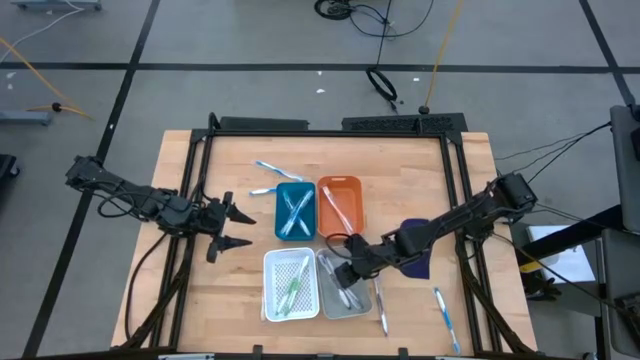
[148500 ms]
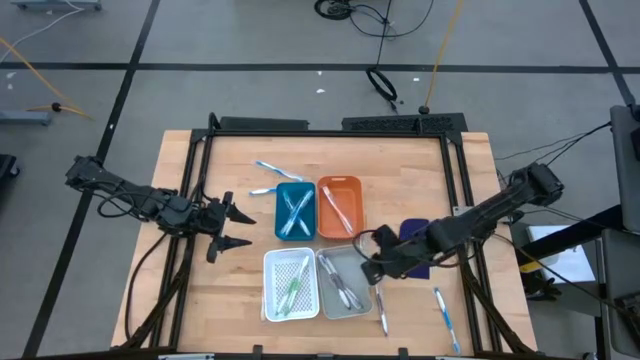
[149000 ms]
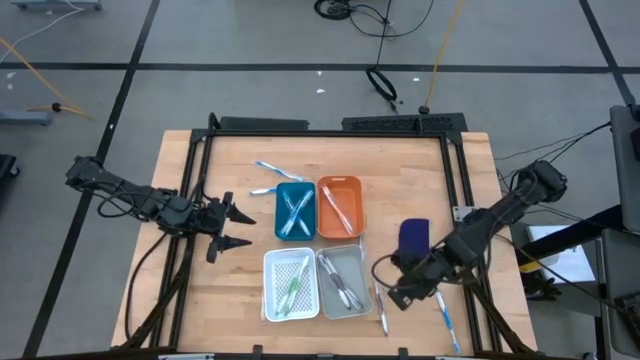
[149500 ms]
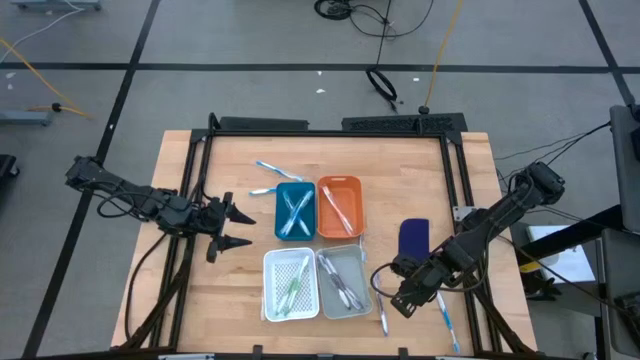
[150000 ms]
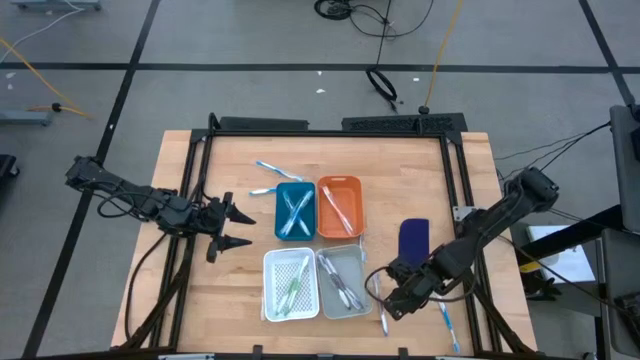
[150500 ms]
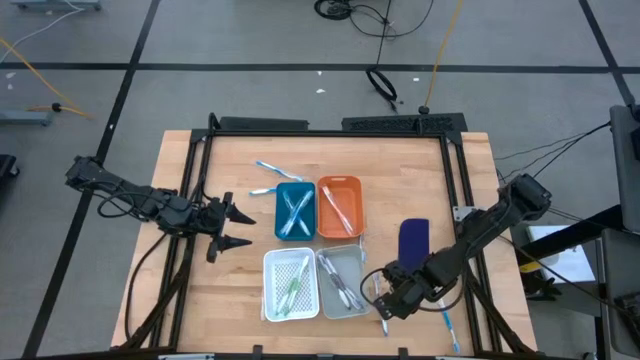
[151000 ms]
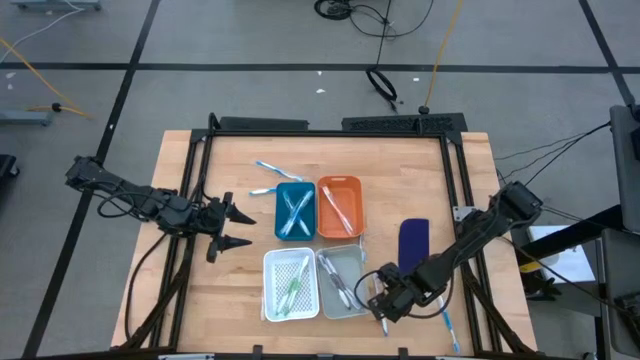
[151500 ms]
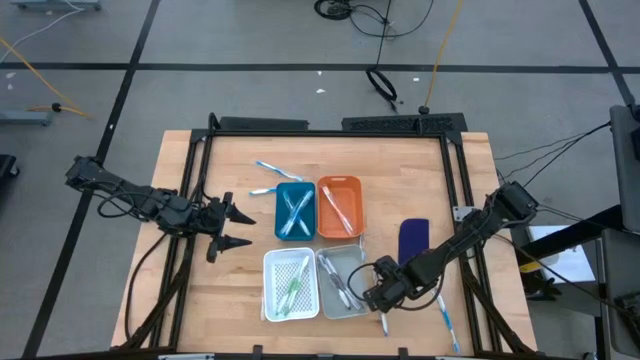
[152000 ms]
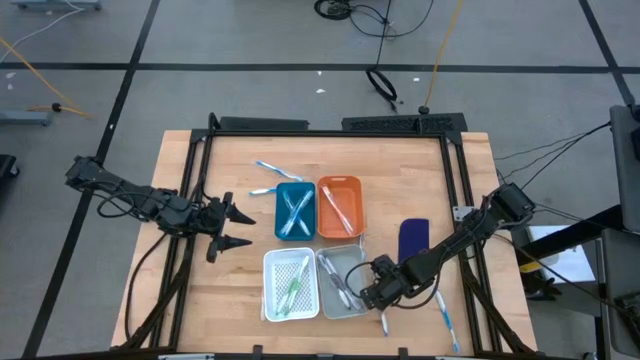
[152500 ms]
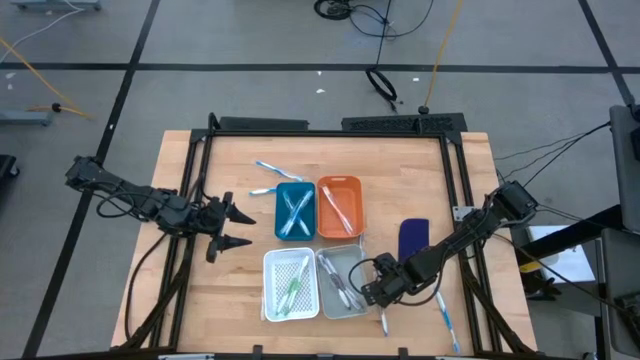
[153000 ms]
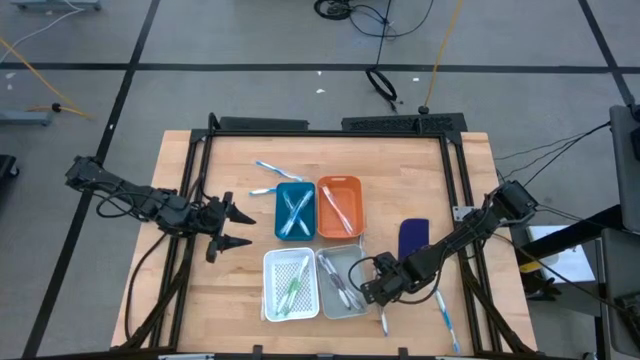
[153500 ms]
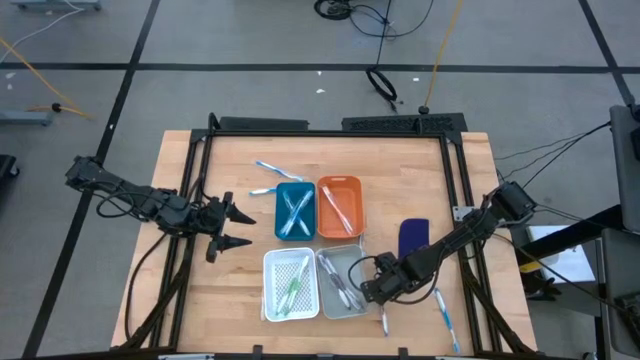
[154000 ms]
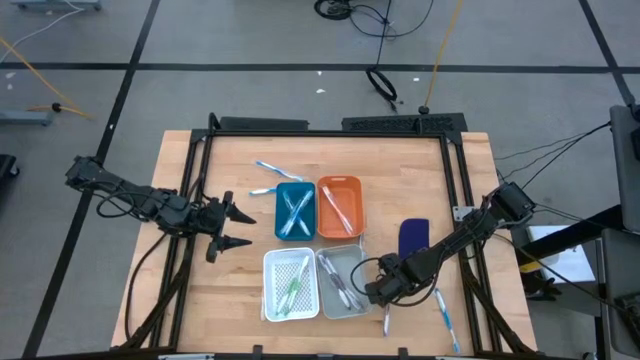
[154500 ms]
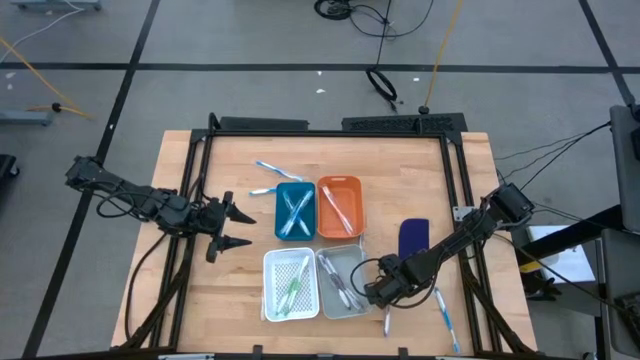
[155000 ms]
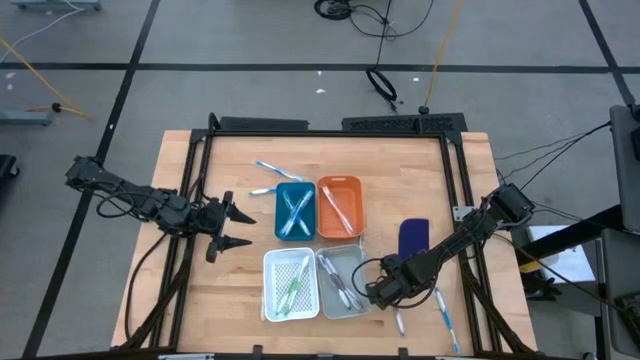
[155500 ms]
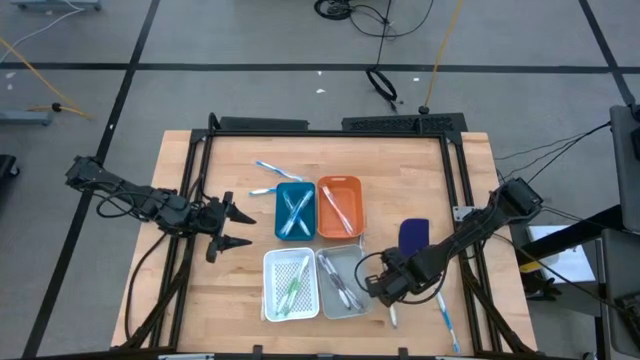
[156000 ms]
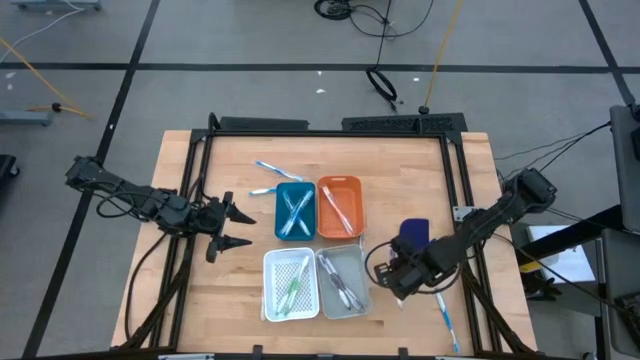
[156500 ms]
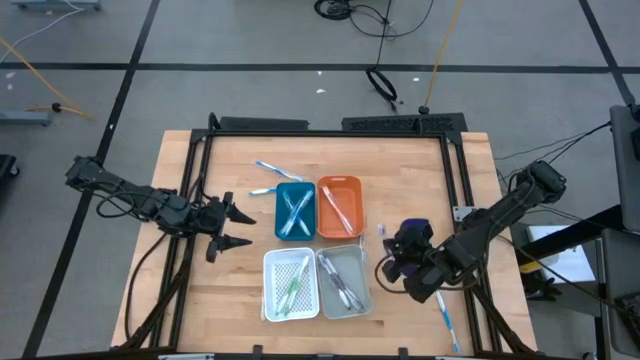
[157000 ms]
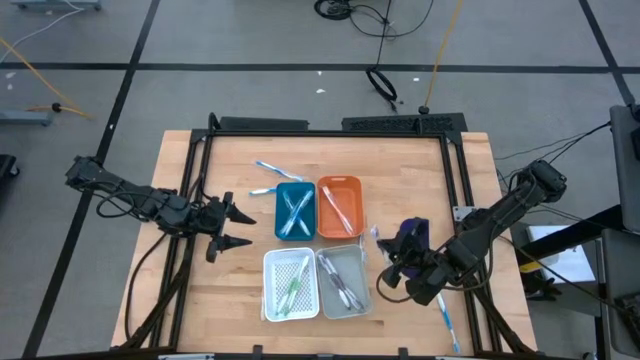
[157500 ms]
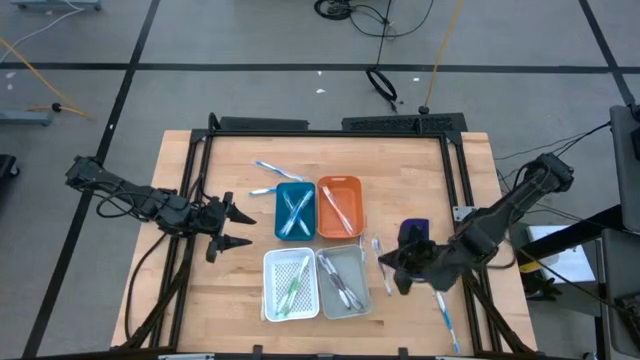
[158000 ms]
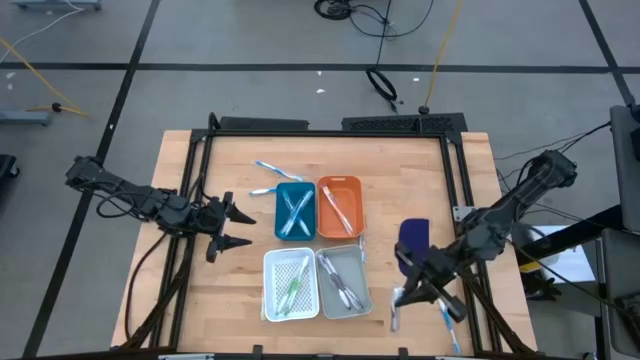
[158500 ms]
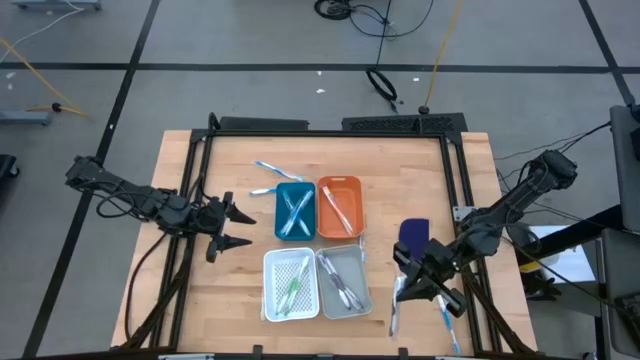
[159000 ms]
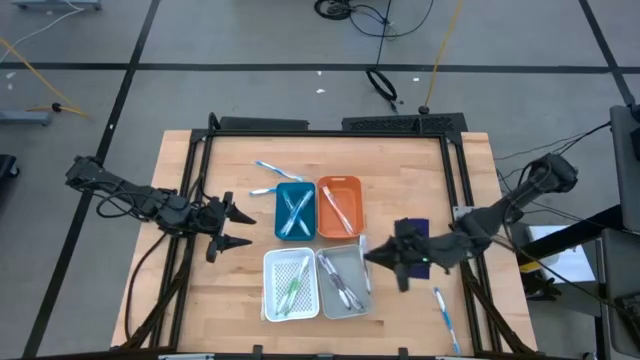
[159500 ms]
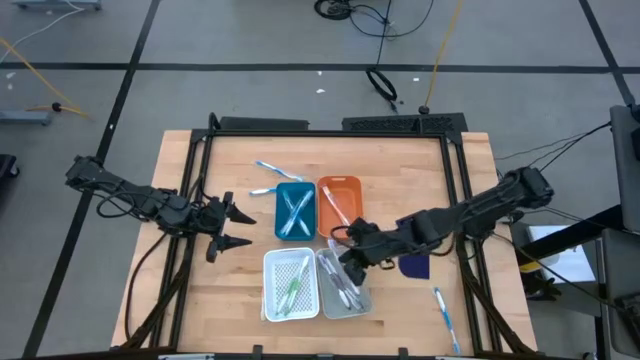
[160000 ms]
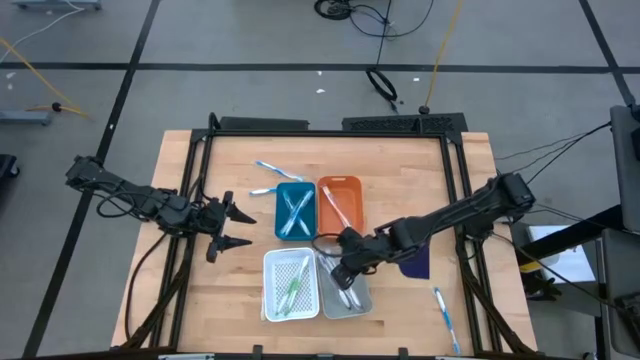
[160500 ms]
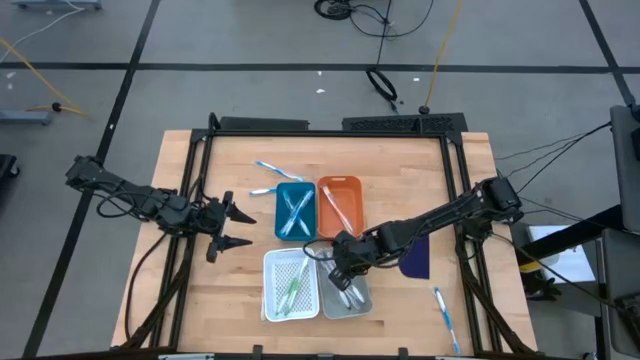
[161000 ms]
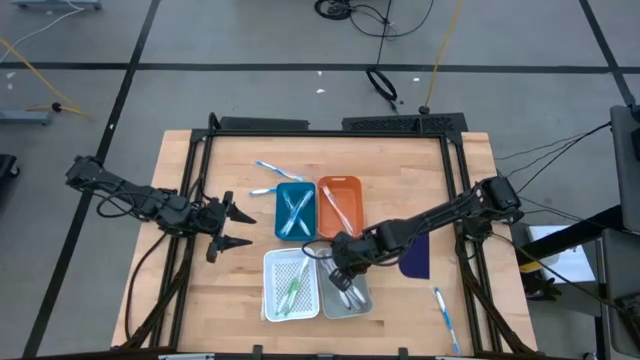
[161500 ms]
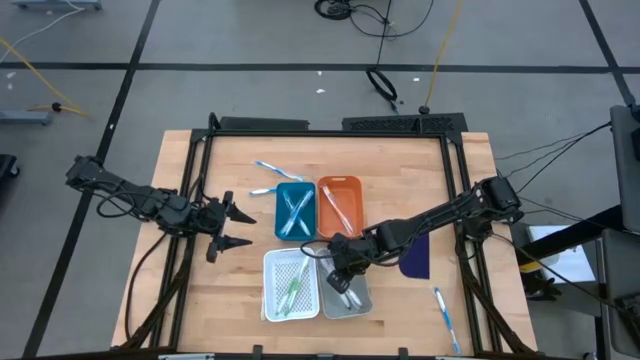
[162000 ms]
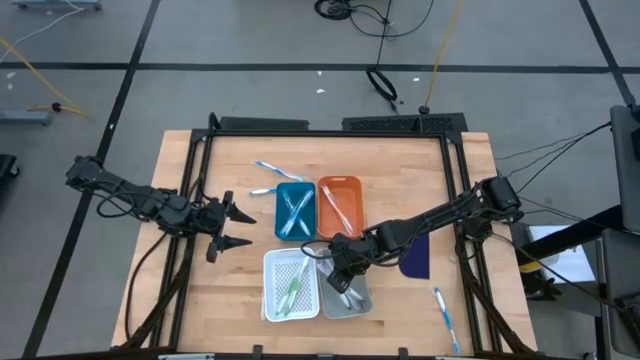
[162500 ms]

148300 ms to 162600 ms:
Task: Pick & Place Toothbrushes
Put the purple toothbrush into the gray bin

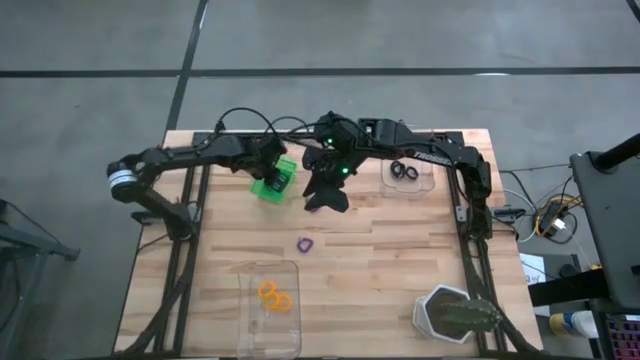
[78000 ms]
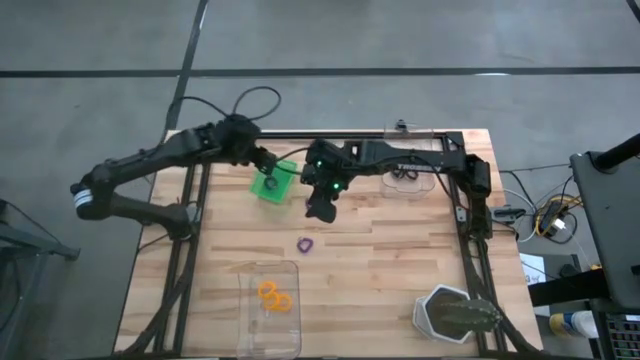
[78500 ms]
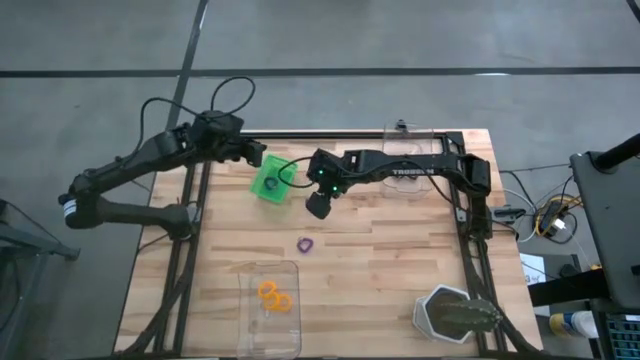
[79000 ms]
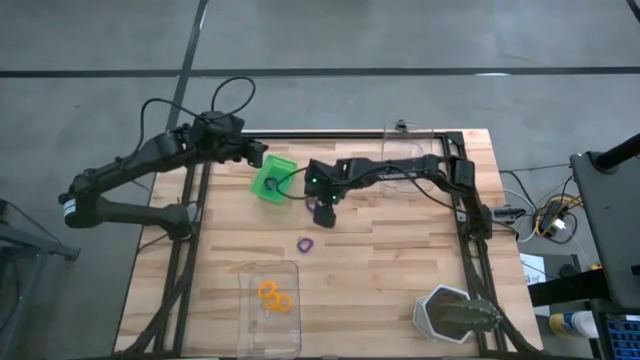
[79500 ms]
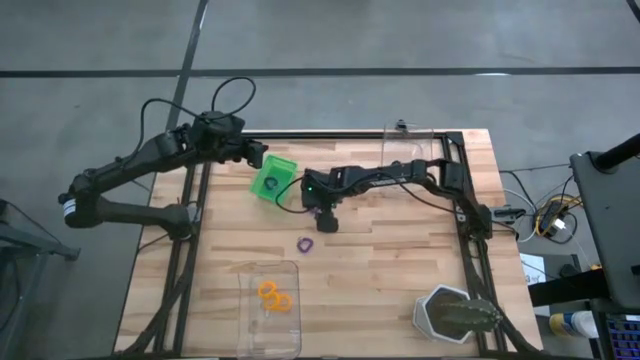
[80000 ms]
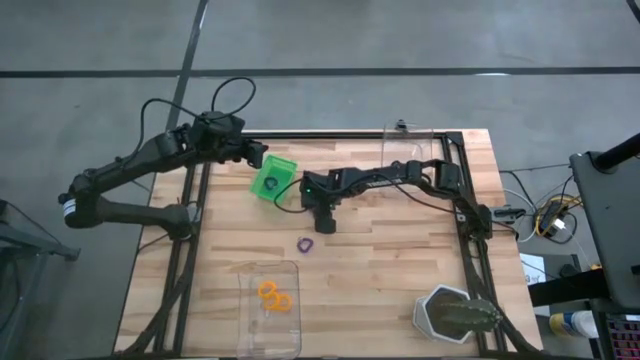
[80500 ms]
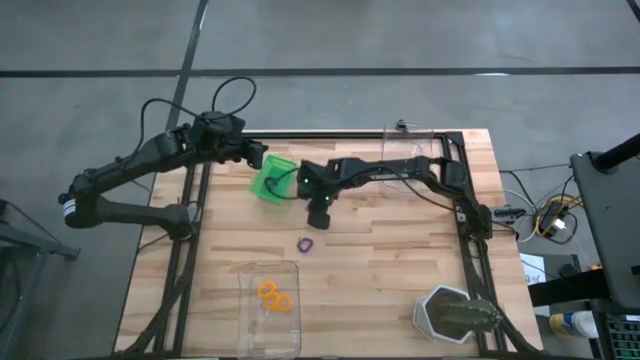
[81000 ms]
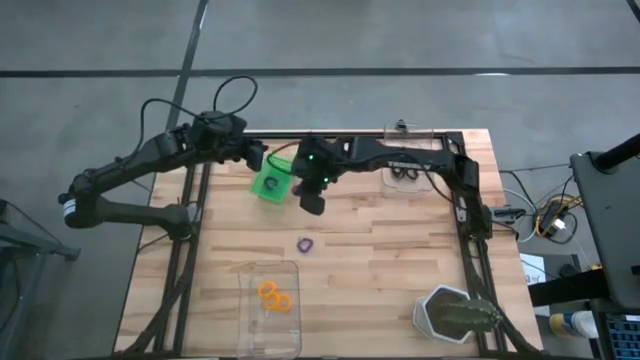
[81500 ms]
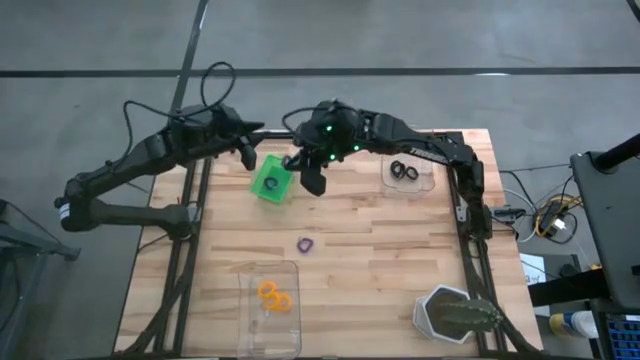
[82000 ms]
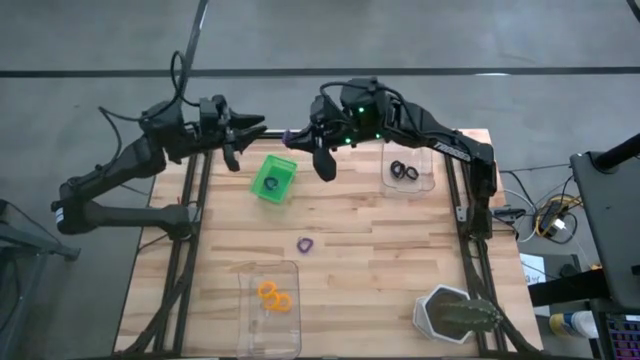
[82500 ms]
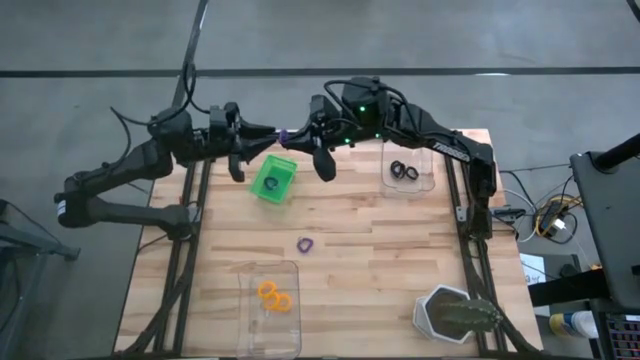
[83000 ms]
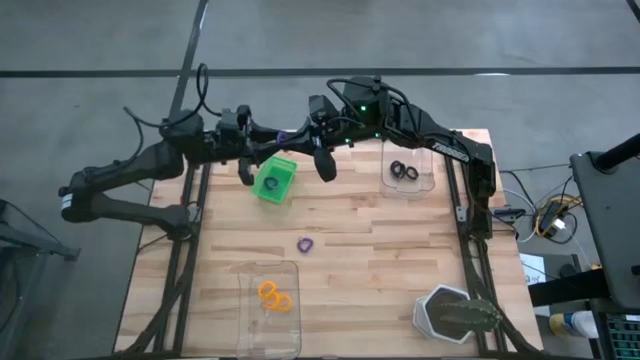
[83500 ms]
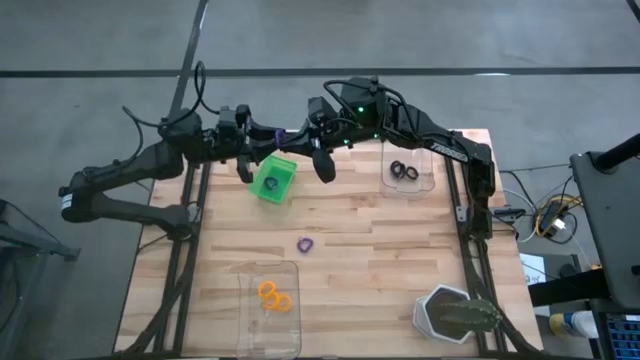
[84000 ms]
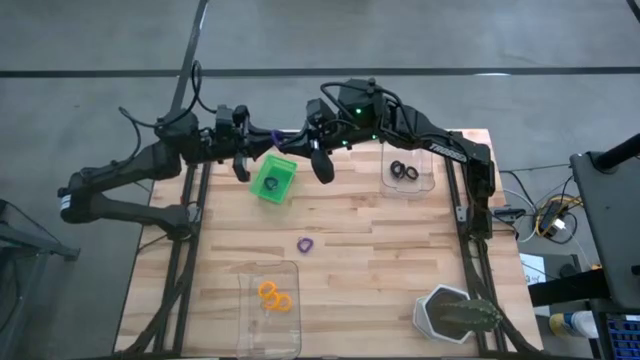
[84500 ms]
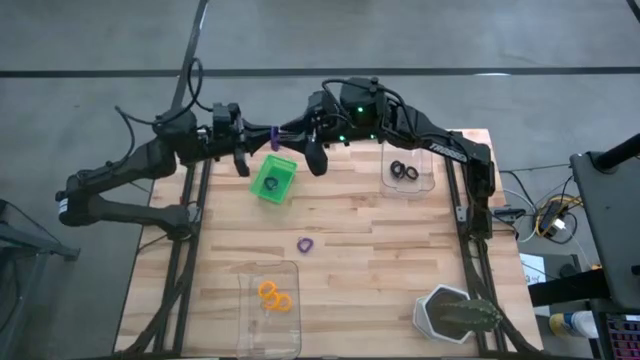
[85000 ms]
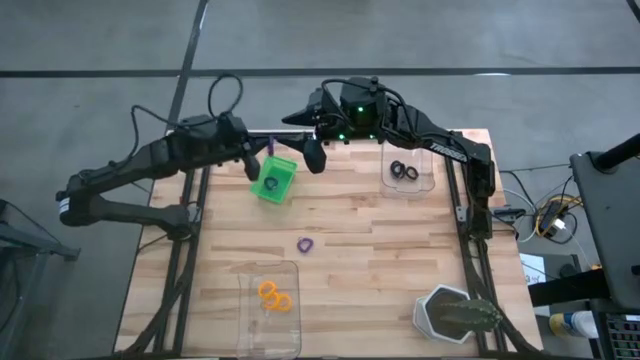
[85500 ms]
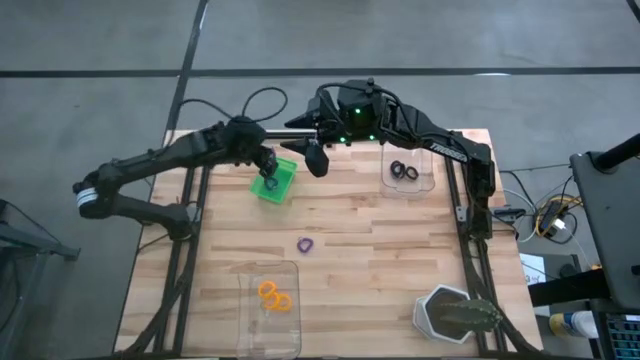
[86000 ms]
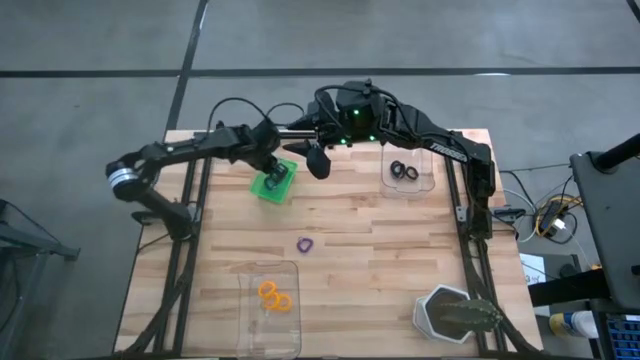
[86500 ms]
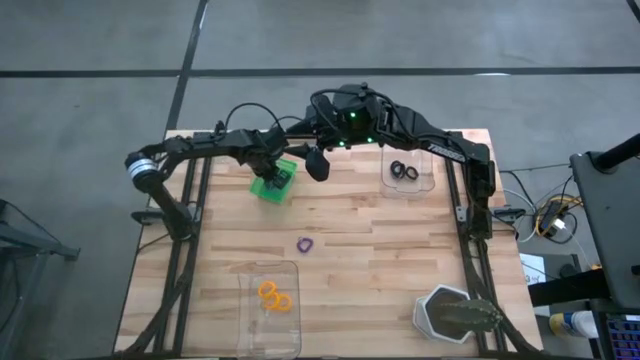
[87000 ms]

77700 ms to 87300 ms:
Task: Sort spring keychains
Put the top purple spring keychain into the green bin
